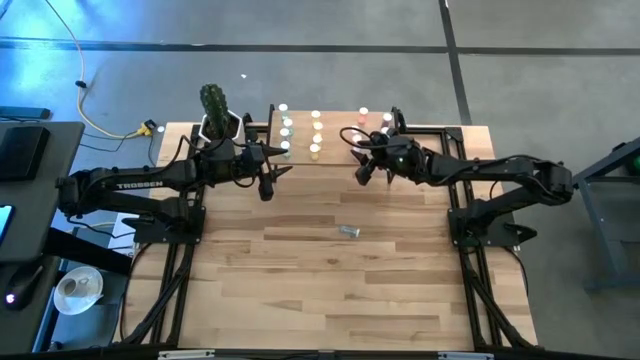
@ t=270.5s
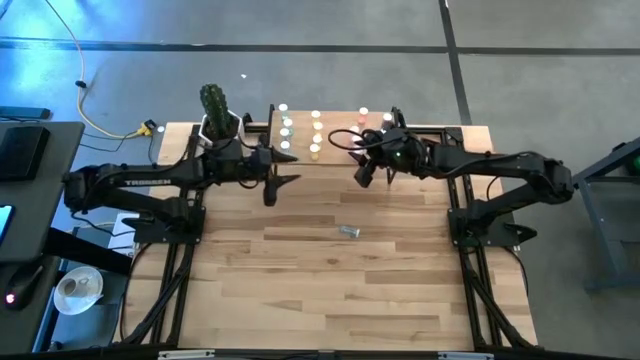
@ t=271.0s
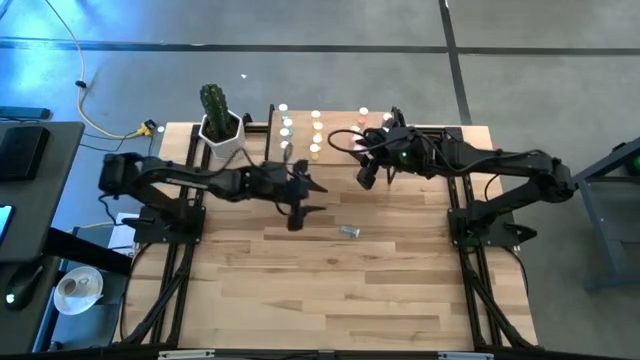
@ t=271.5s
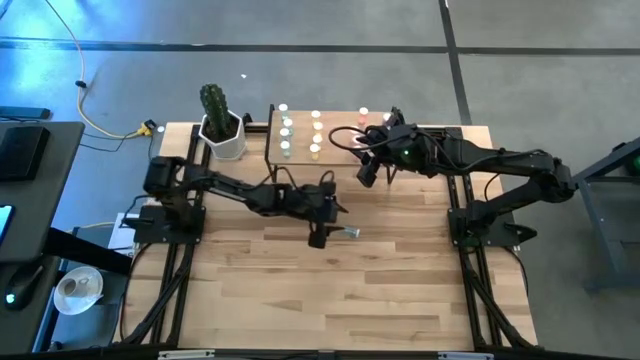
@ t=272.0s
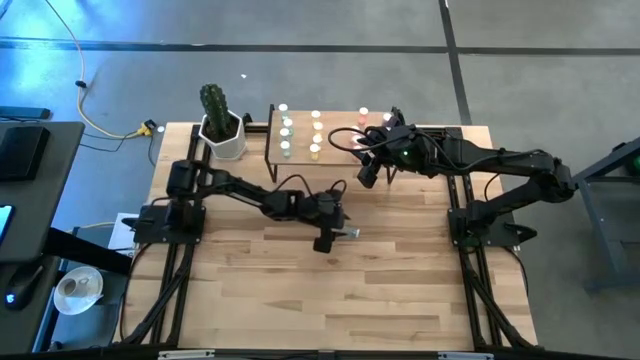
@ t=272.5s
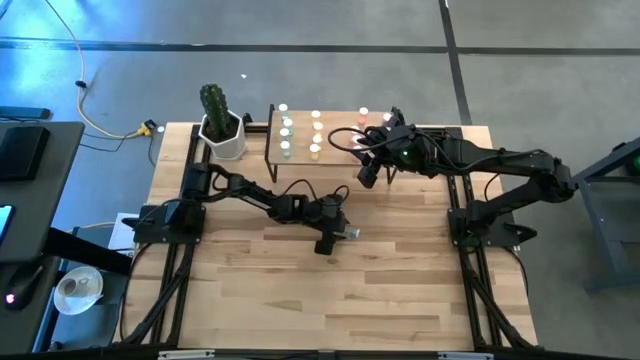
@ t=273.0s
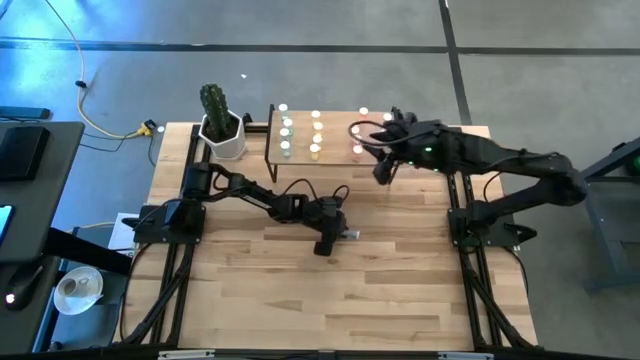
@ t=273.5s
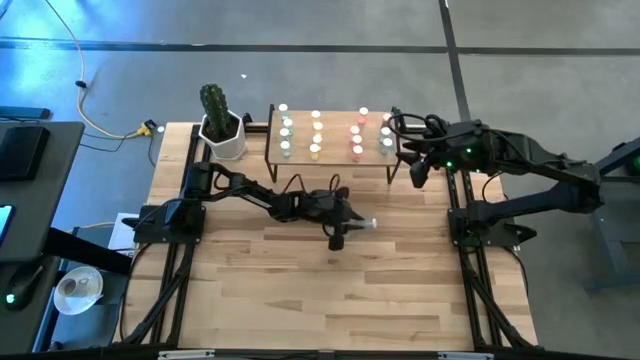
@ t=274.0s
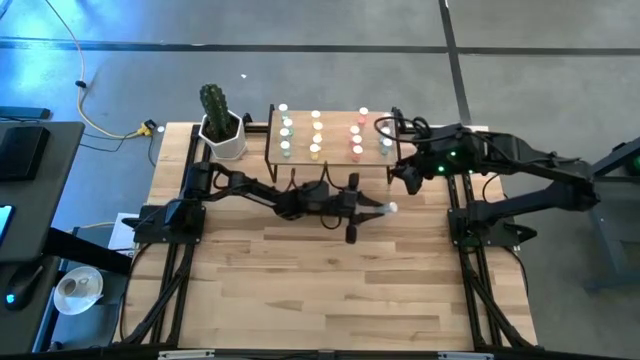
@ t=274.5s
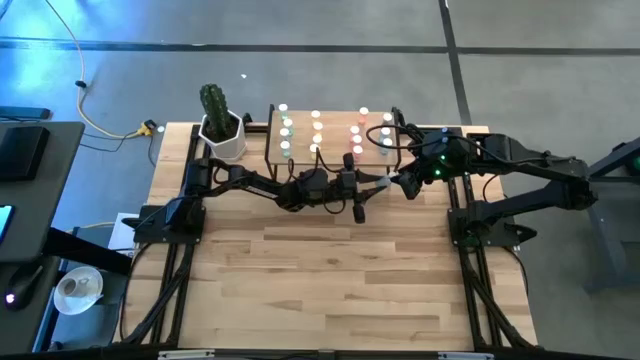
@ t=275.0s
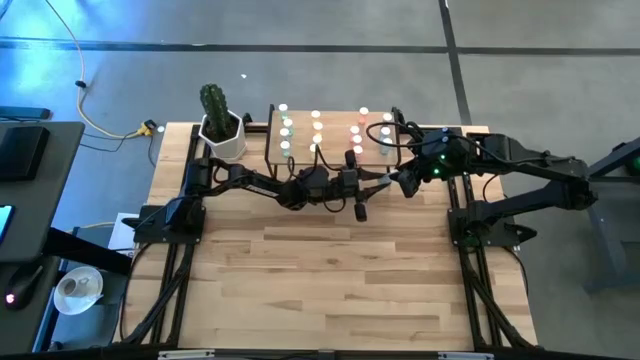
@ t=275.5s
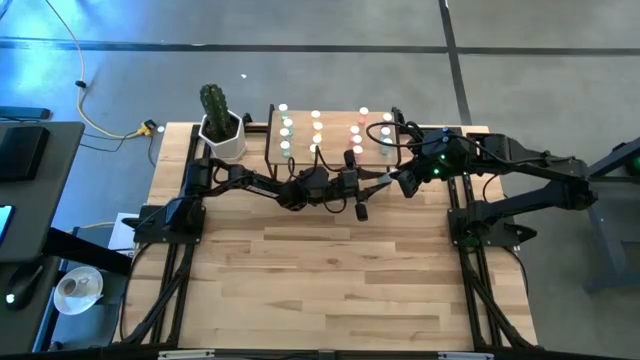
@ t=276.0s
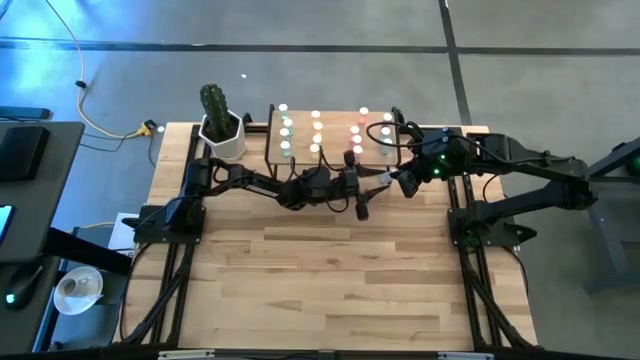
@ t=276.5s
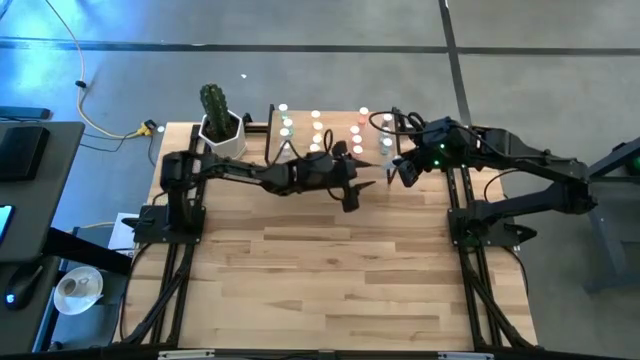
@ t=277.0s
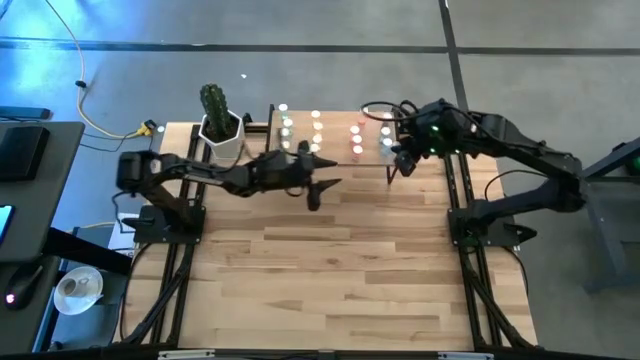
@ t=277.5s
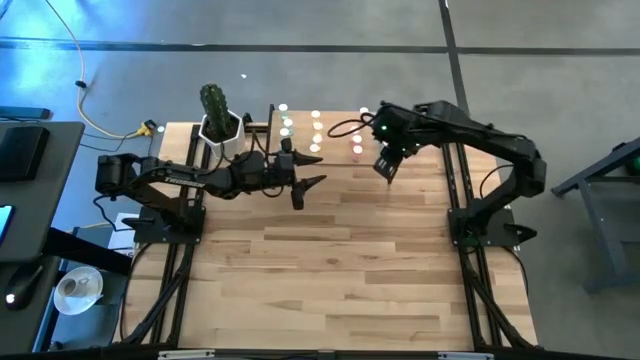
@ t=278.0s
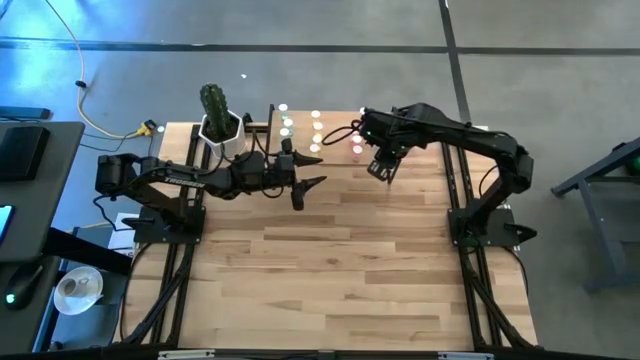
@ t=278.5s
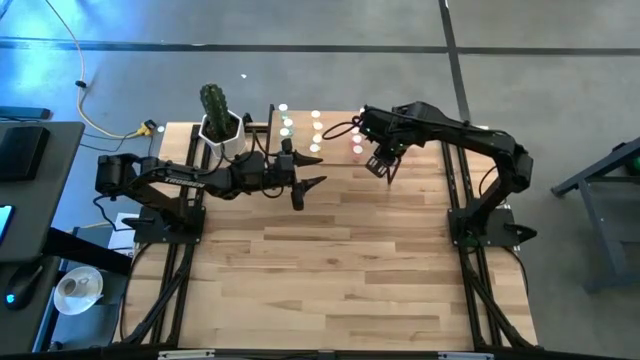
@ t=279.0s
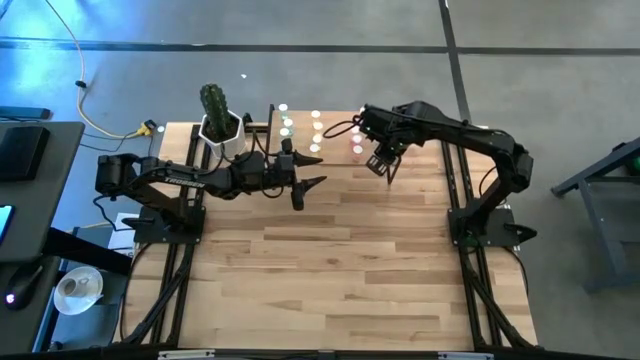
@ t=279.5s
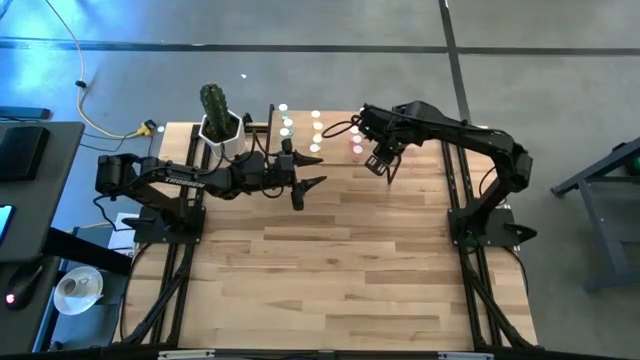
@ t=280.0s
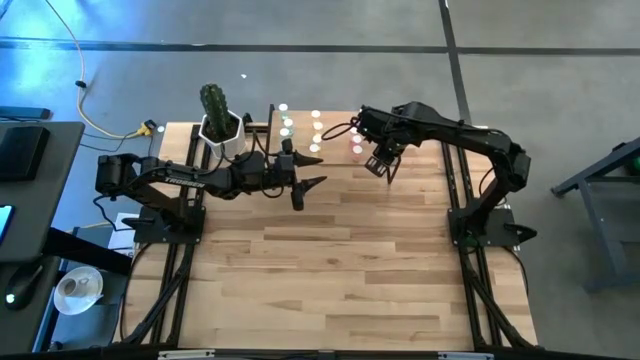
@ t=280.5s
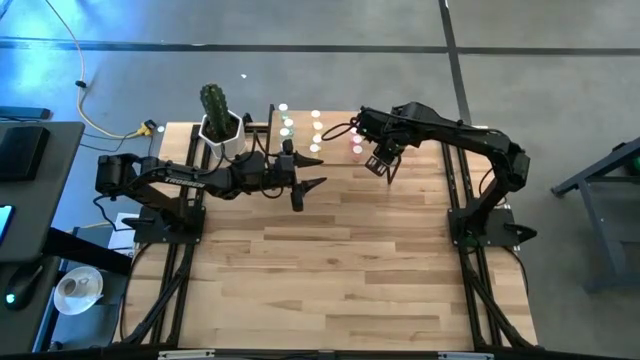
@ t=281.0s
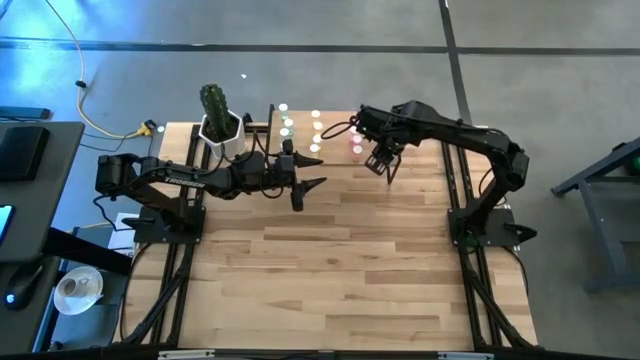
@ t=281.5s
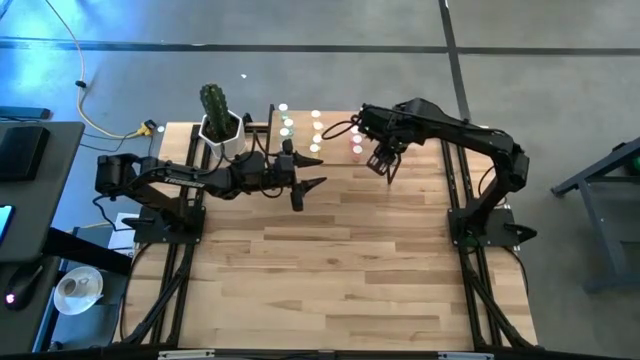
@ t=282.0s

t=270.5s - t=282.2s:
Task: Pick and place medicine bottles onto shelf by color
Put the blue pill bottle on the shelf aligned with the other blue pill bottle

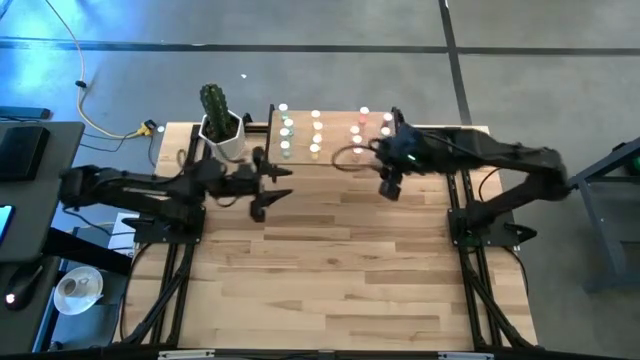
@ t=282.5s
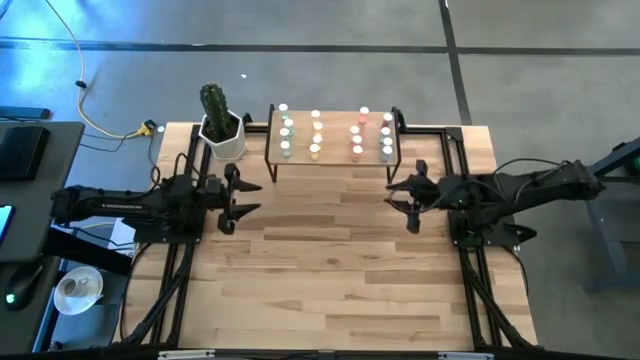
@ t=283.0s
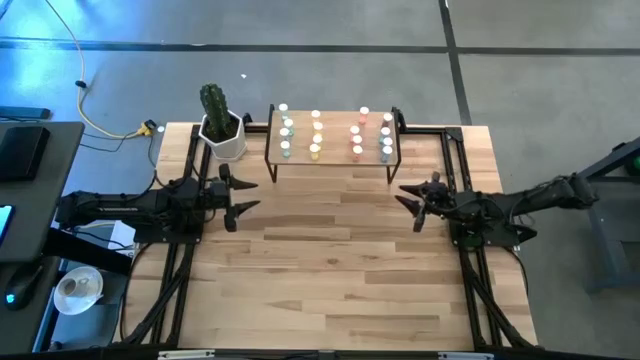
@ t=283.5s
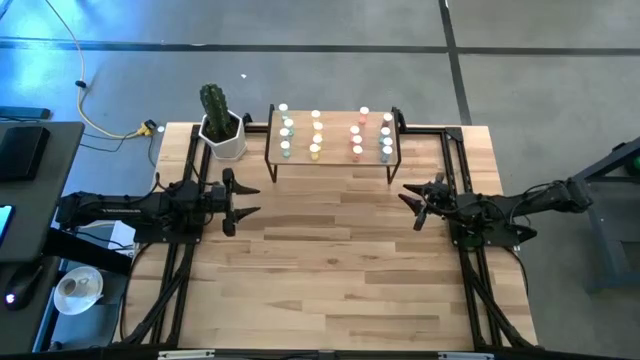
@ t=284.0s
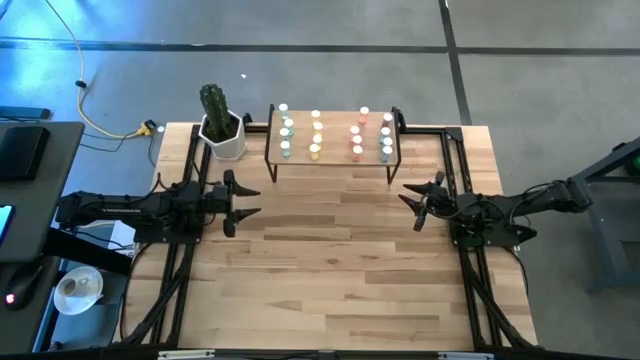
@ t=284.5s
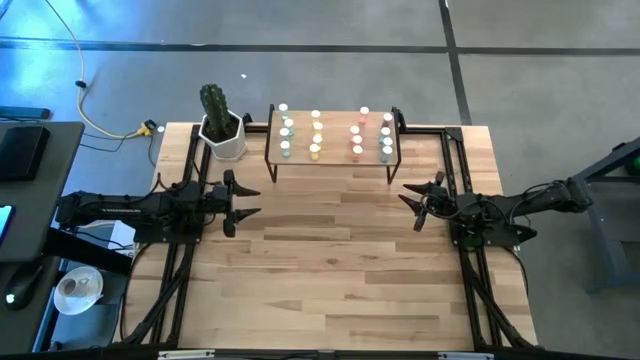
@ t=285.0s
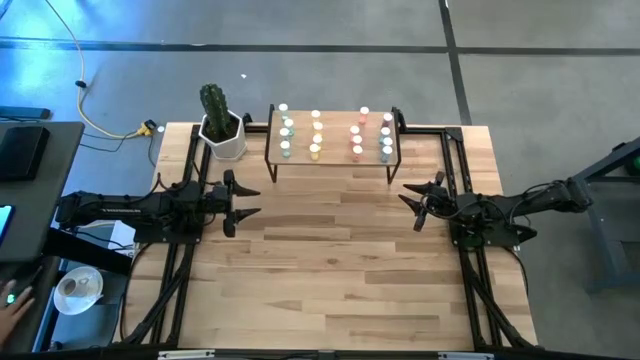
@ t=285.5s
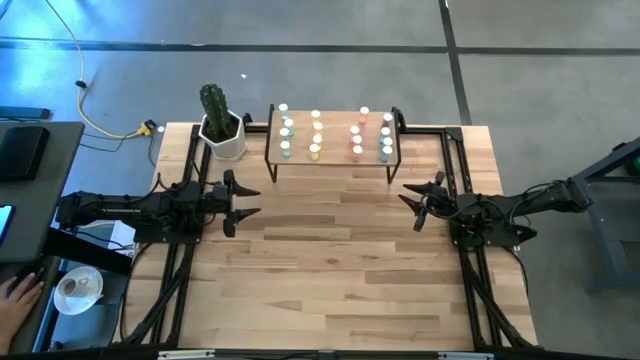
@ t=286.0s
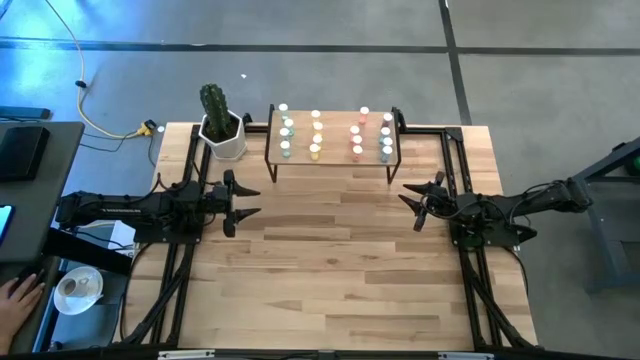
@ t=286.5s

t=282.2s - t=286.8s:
Return to Home Position

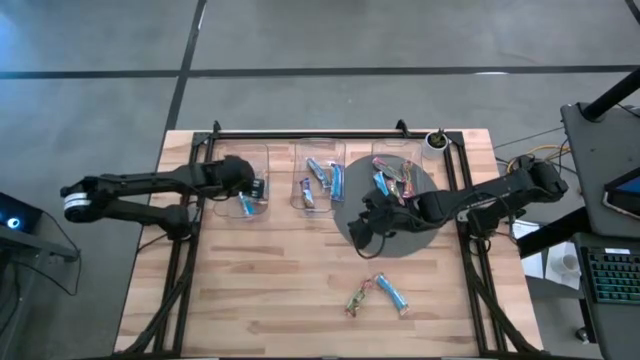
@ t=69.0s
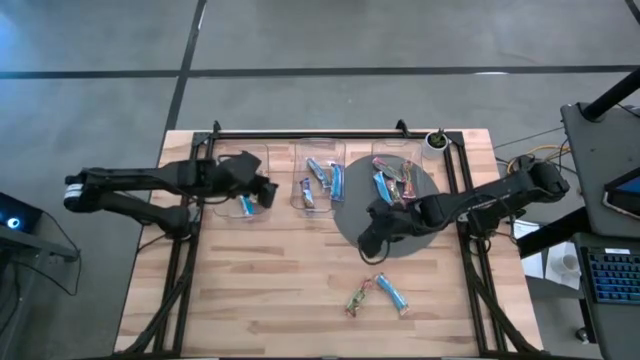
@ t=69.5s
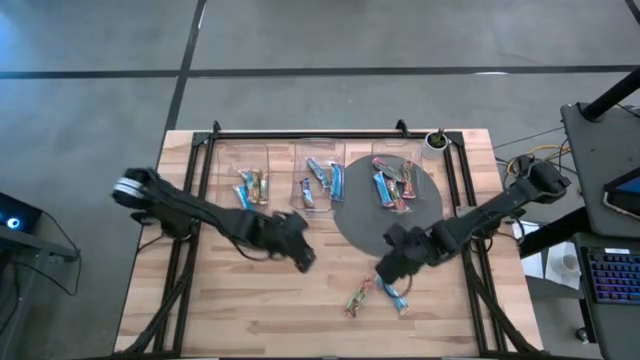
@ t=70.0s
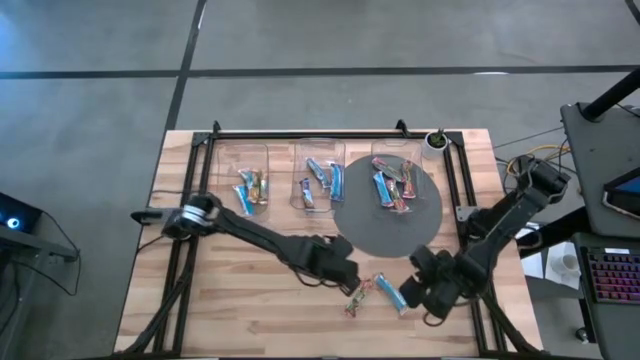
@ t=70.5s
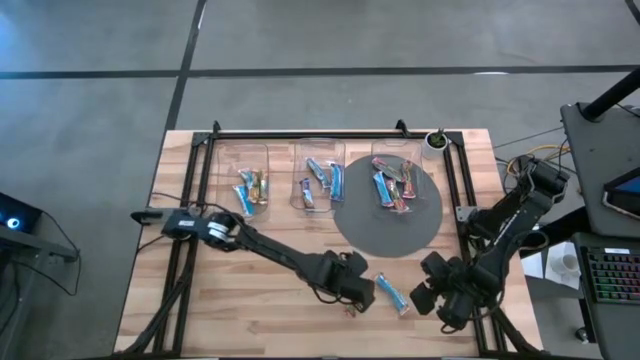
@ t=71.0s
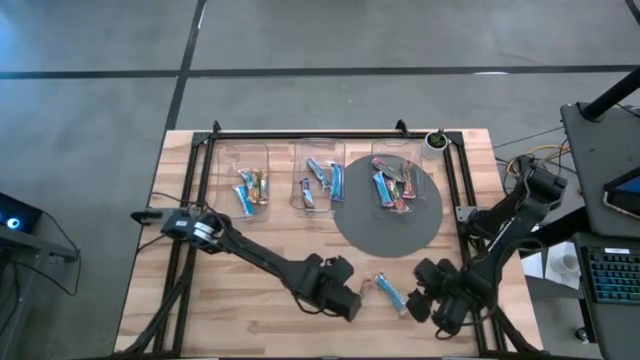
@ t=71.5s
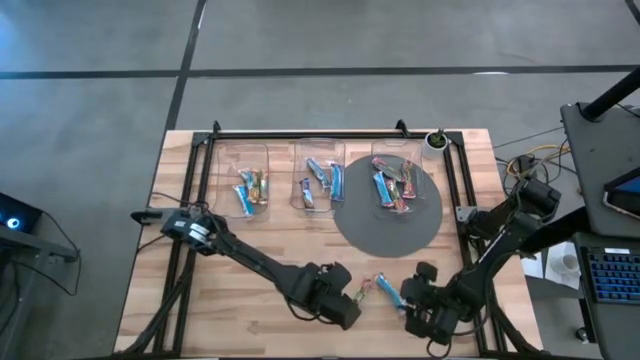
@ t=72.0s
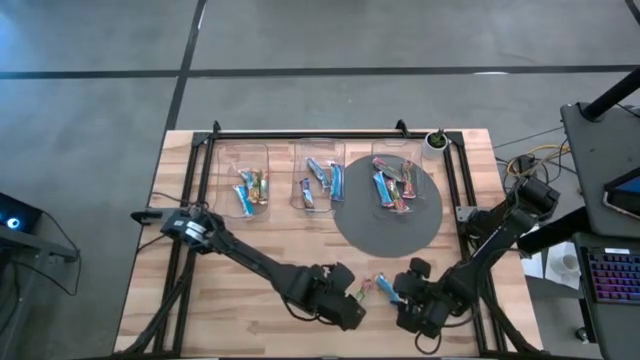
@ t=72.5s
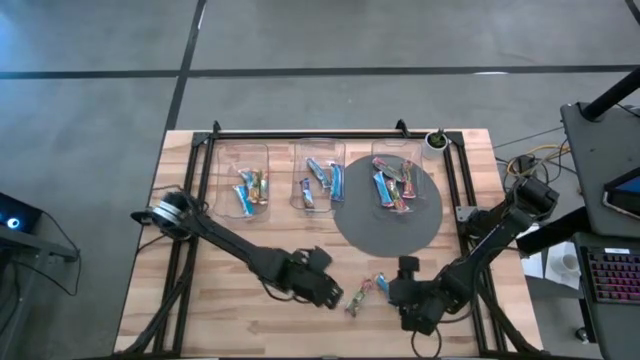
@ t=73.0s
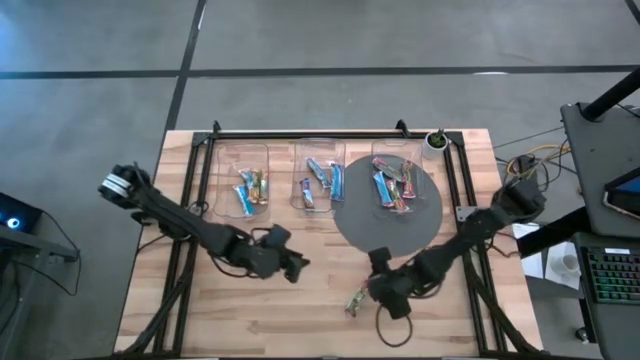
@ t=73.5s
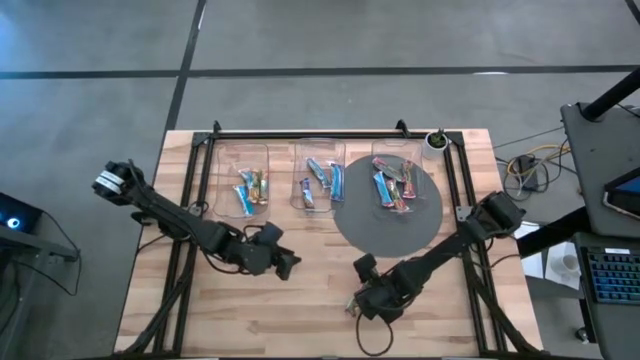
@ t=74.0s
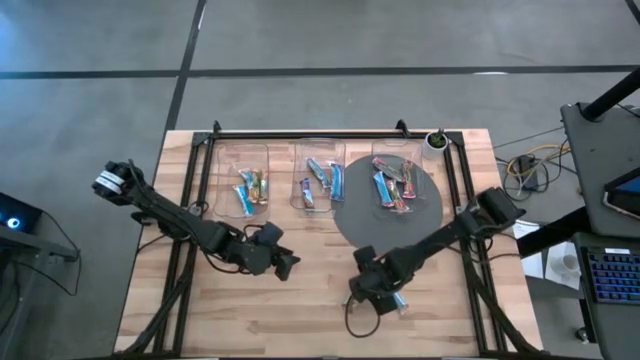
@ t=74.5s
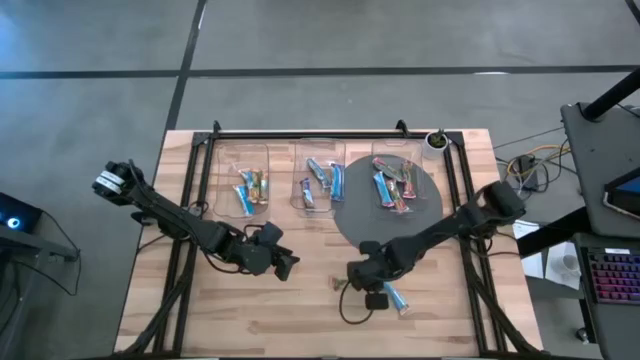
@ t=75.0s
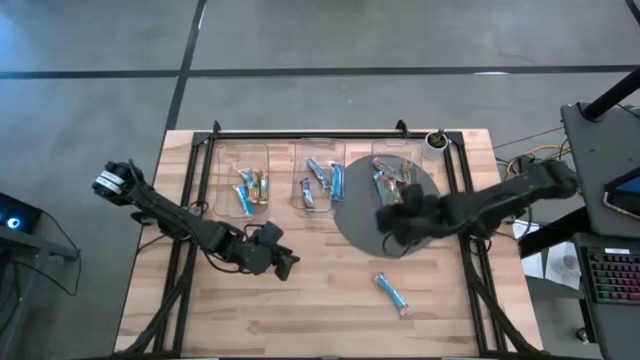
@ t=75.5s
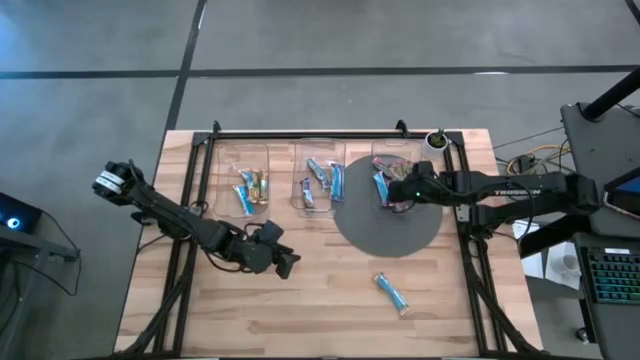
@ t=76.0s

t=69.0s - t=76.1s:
Task: Pick and place Granola Bars by type
Put the red granola bar into the right transparent container
